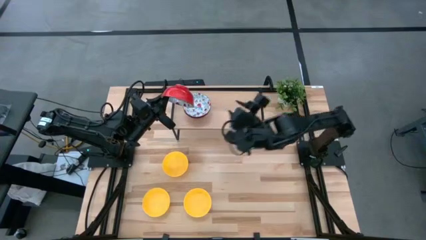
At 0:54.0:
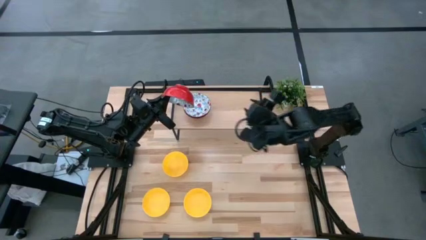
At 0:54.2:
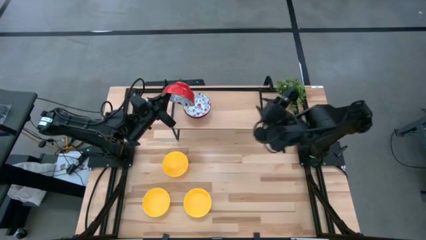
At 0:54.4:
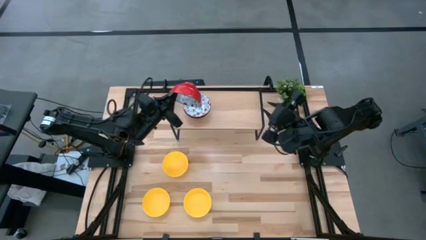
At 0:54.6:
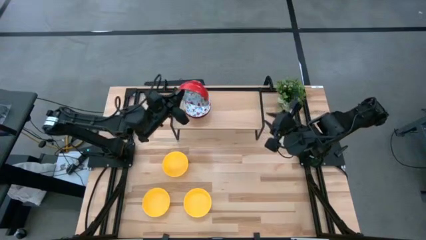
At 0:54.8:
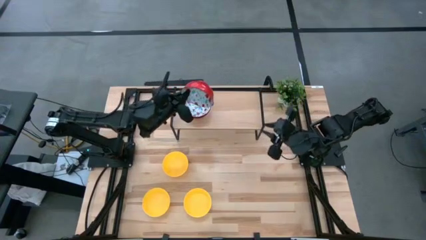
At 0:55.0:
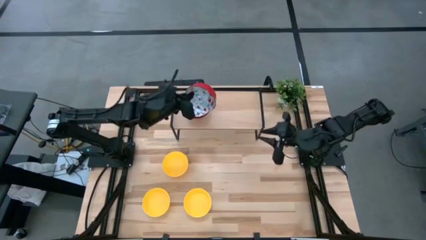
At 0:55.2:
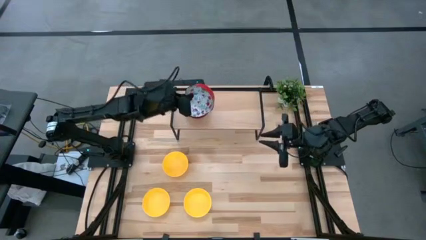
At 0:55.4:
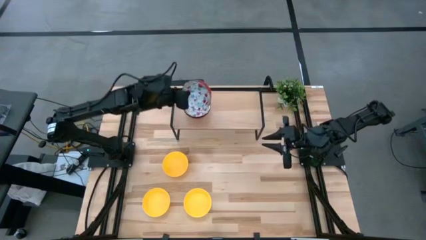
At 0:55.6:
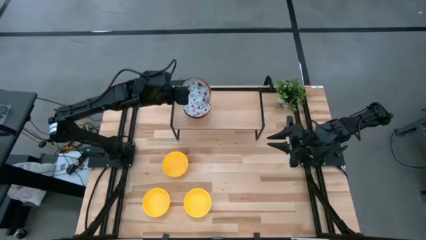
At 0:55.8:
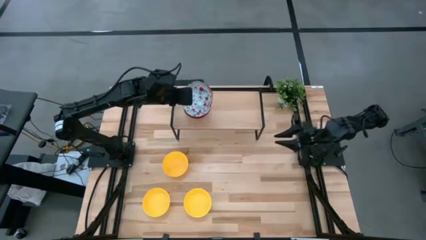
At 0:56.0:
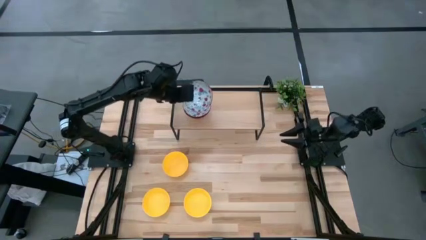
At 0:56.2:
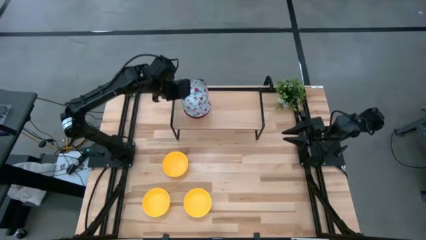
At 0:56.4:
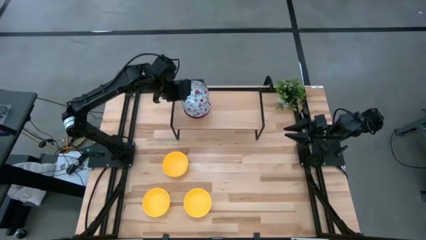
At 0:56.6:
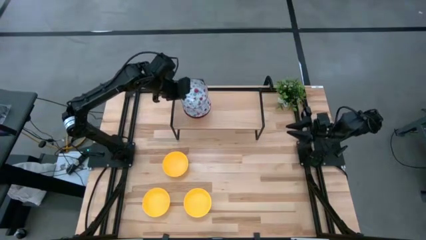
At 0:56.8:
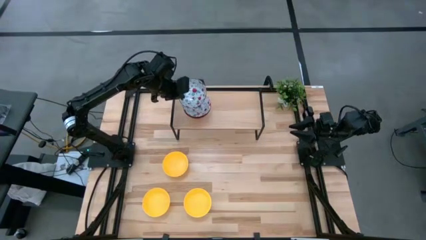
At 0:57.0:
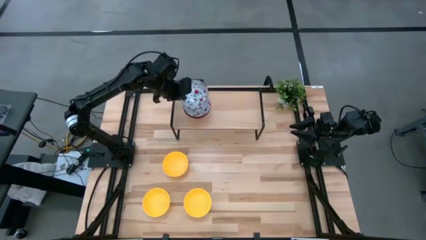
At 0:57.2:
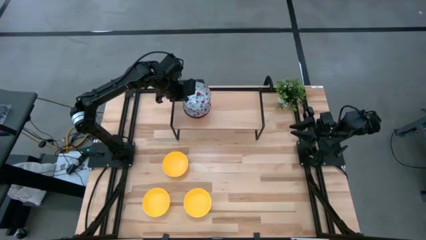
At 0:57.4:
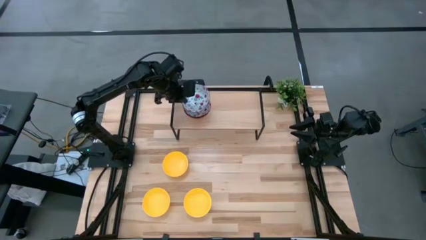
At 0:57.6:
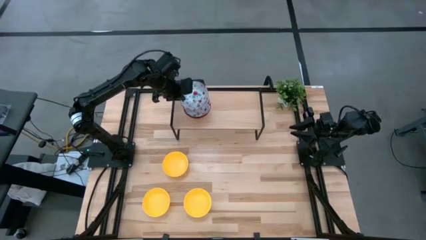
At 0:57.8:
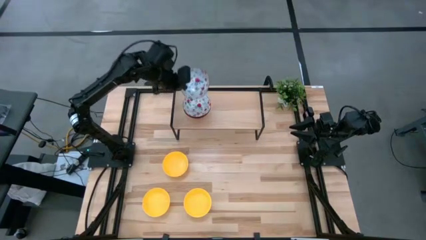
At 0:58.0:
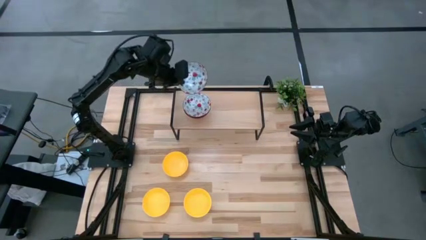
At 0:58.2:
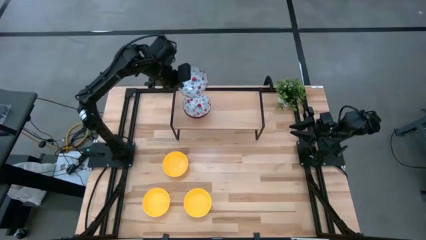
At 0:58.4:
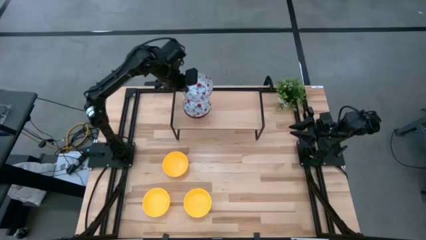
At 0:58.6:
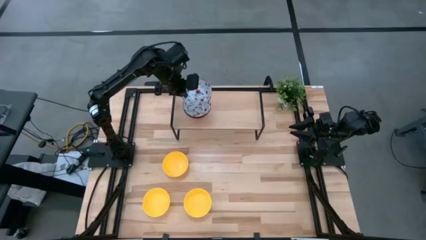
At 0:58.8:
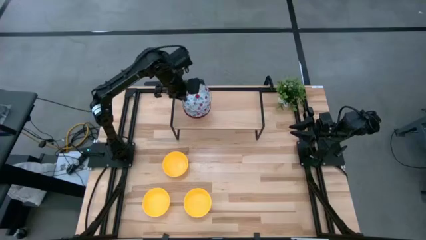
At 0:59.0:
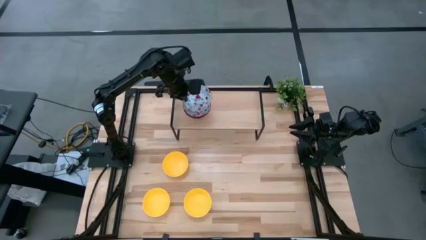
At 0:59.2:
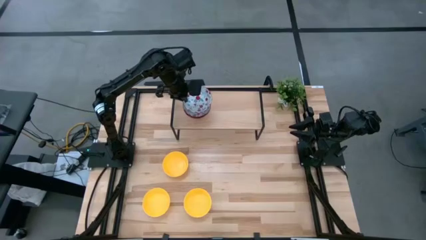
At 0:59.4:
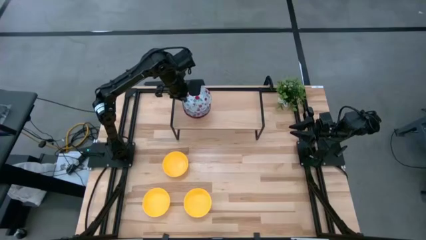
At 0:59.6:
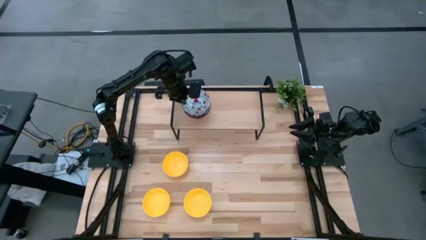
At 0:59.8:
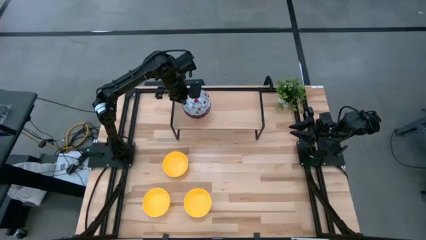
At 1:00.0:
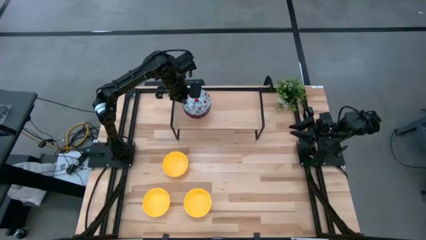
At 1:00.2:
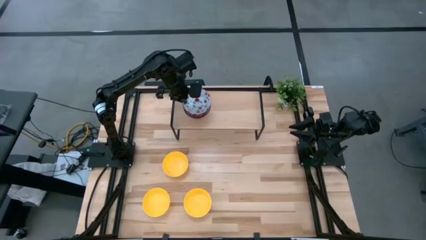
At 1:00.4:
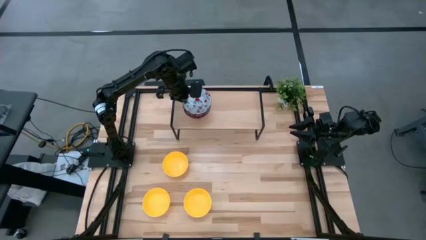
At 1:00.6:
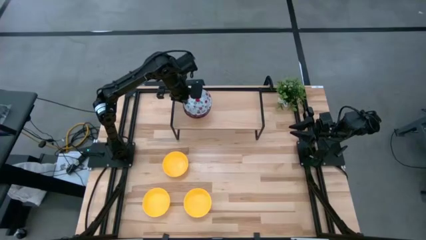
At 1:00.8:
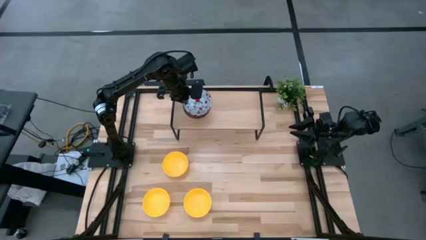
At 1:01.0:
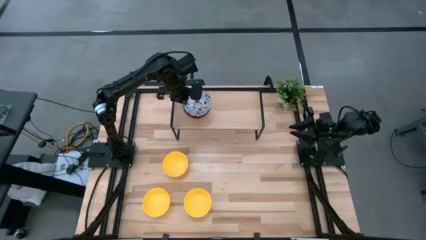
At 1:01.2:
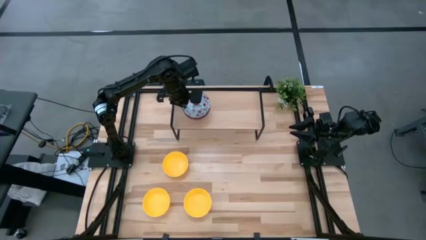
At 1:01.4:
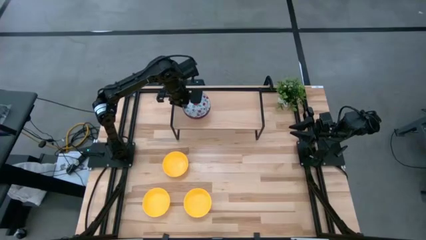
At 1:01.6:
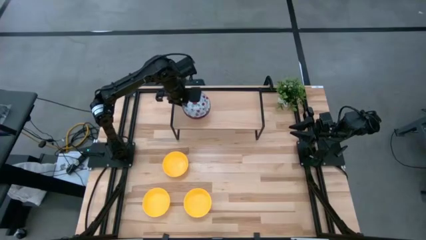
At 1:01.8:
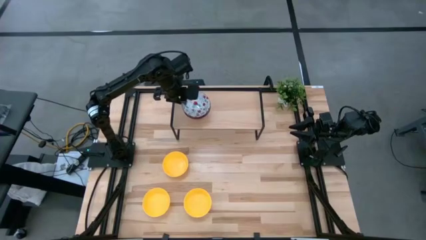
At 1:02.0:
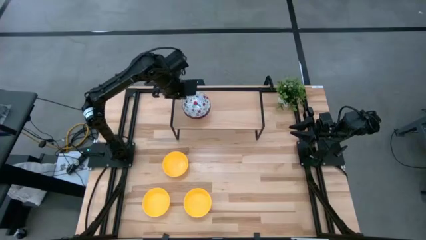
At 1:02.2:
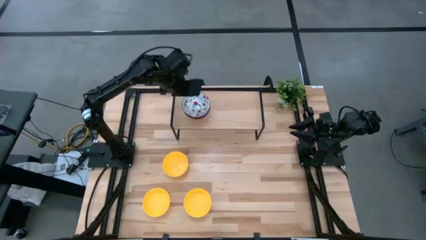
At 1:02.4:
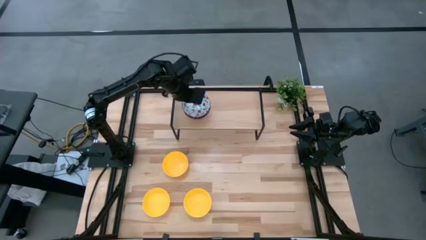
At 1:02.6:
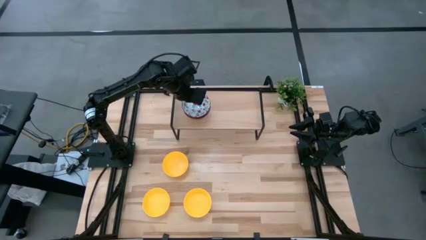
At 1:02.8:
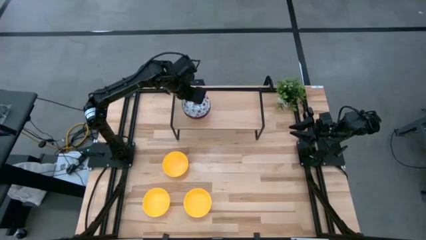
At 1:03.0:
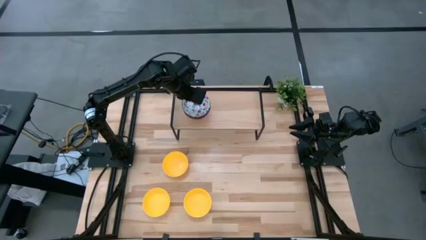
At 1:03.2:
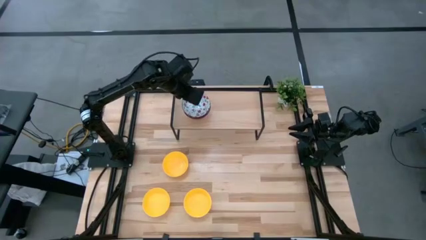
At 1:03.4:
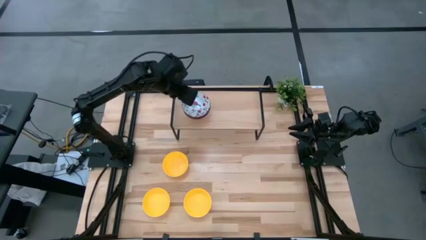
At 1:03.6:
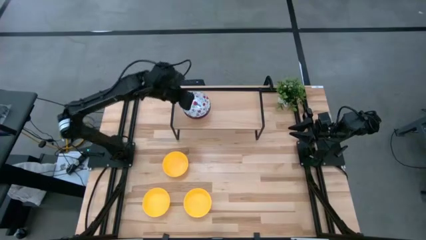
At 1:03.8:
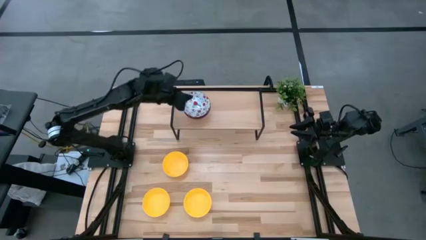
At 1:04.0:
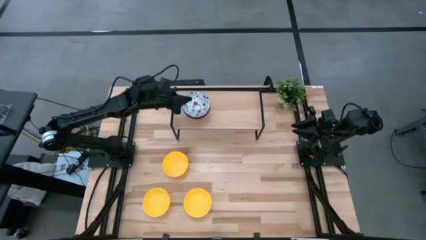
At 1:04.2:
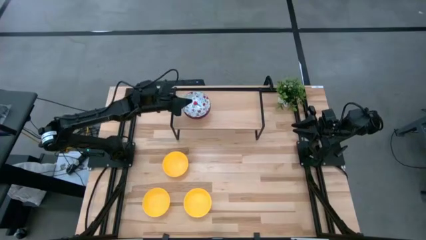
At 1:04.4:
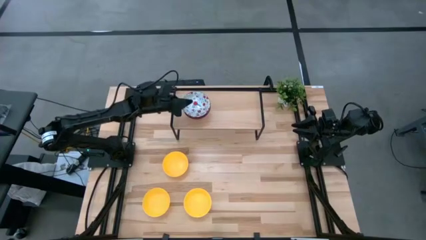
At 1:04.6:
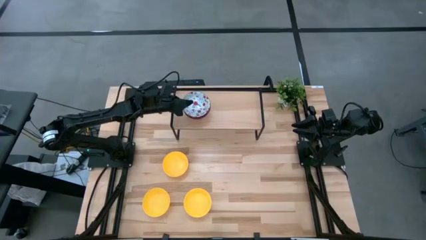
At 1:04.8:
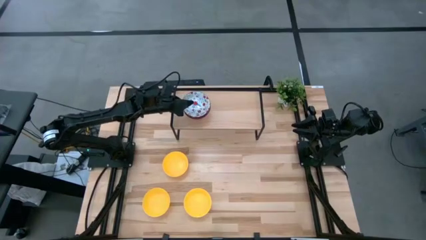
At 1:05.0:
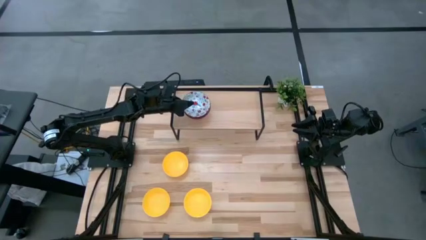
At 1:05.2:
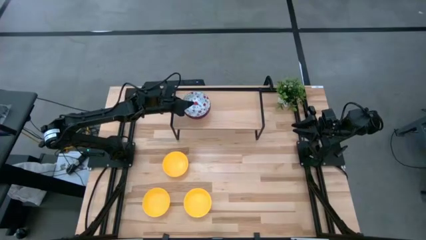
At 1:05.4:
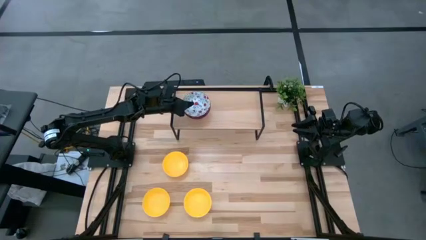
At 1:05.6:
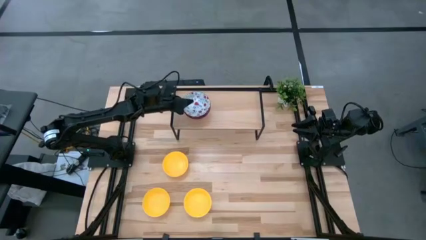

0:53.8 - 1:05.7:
Task: Pick & Place Mini bowls
Stack the white patterned bowl on the white patterned bowl on the shelf
